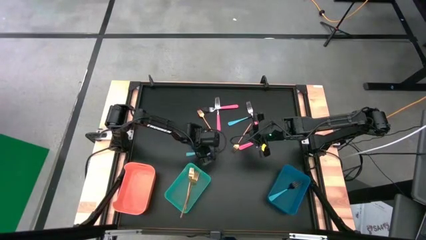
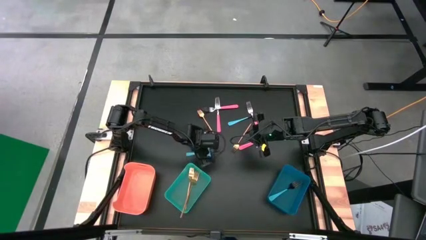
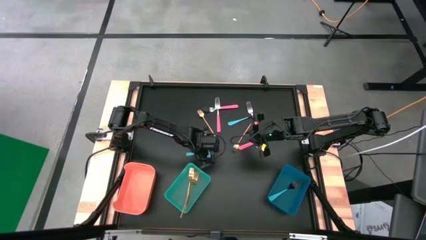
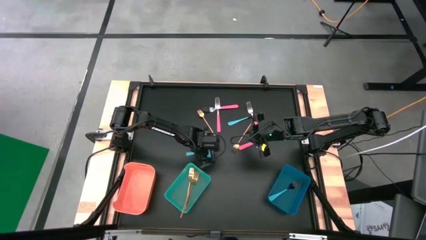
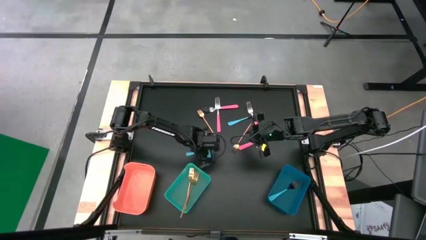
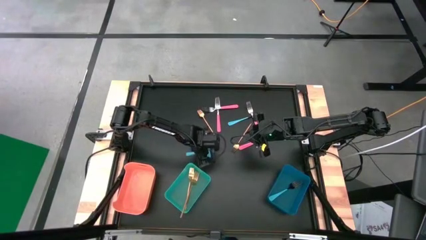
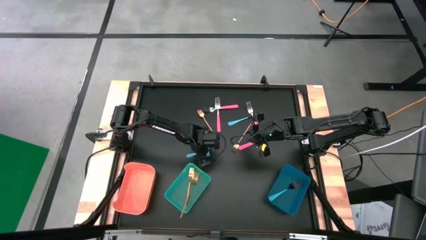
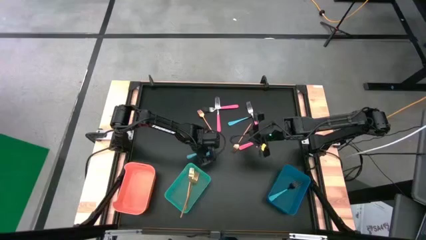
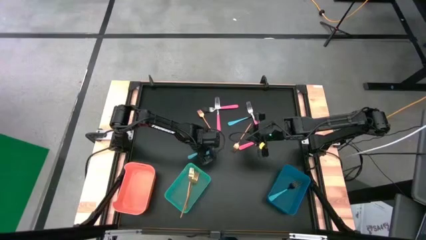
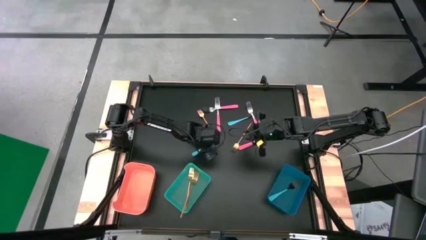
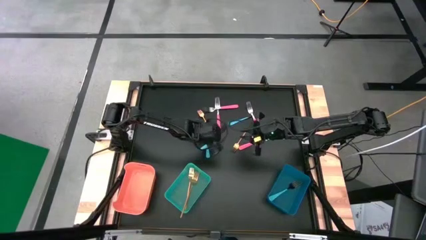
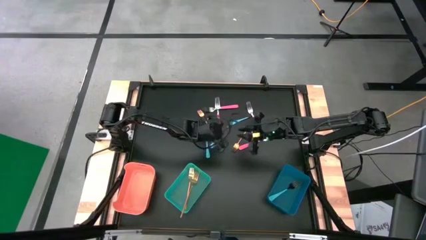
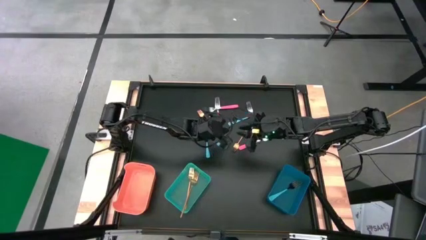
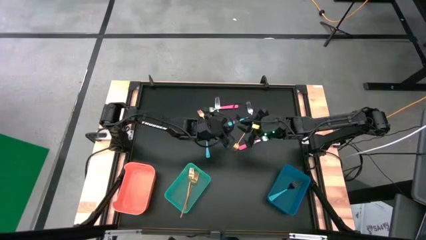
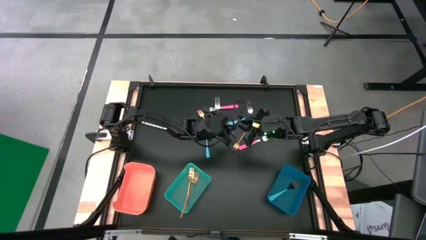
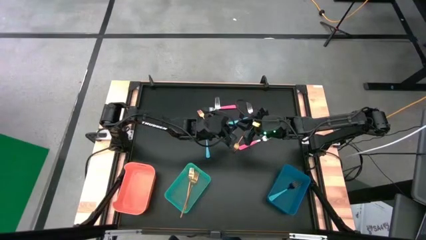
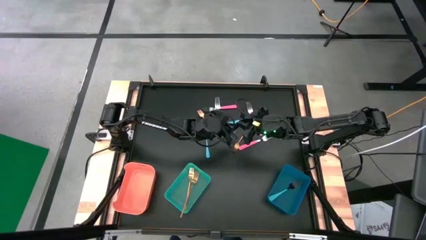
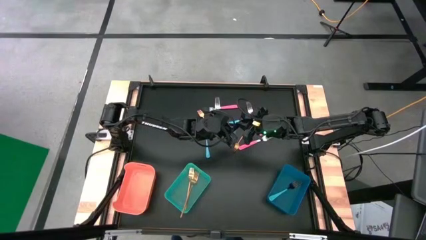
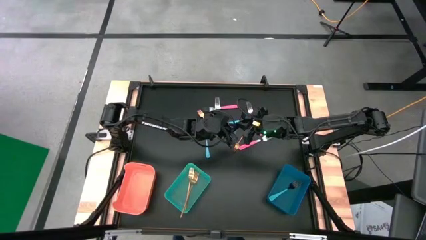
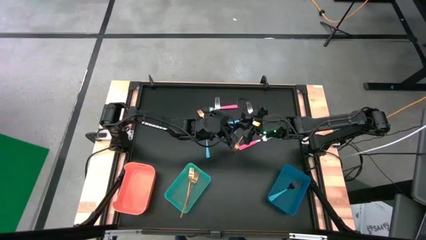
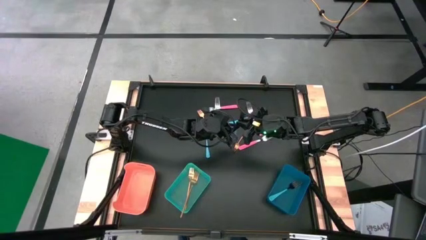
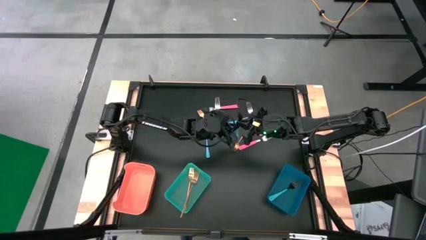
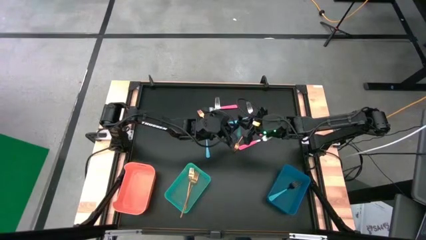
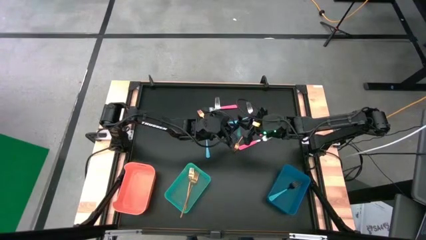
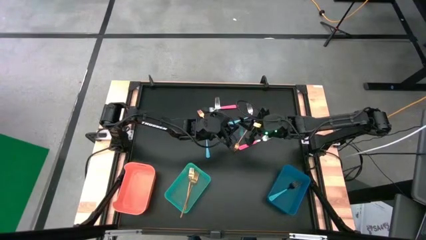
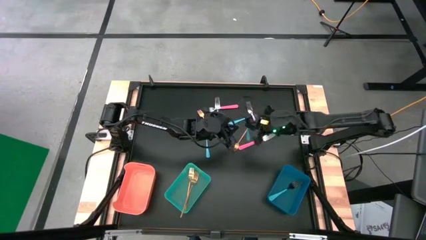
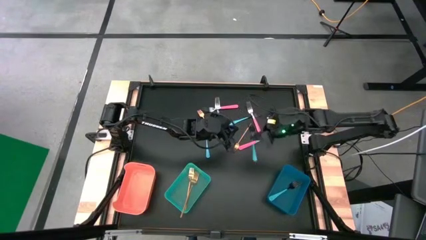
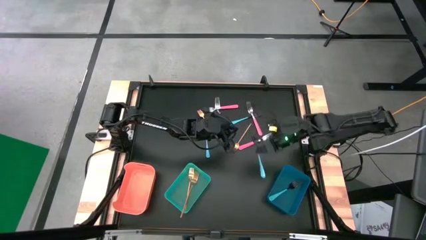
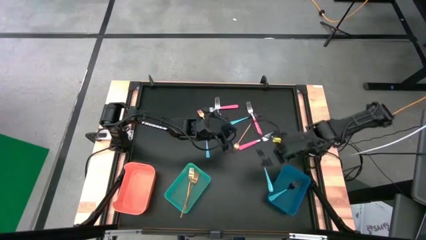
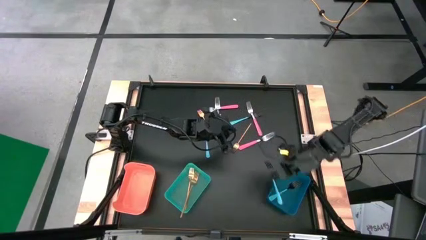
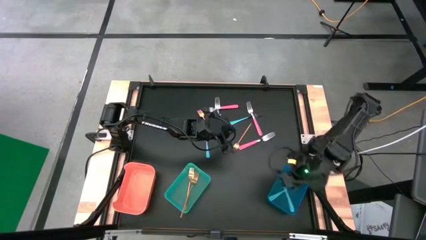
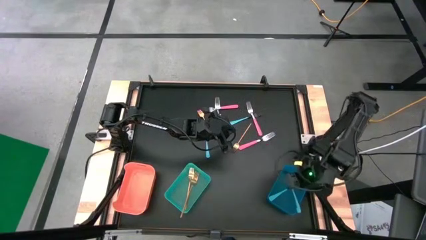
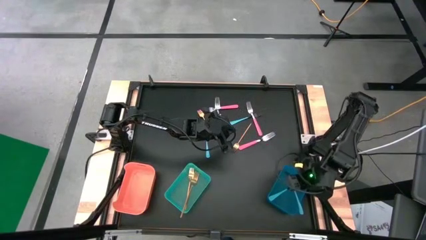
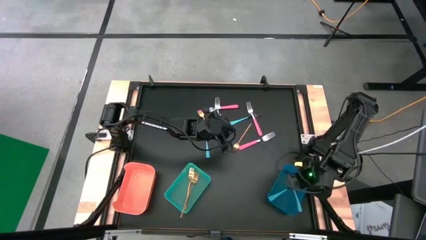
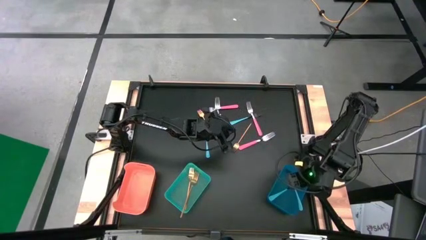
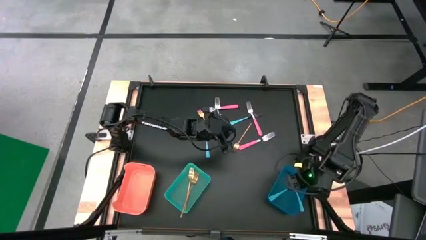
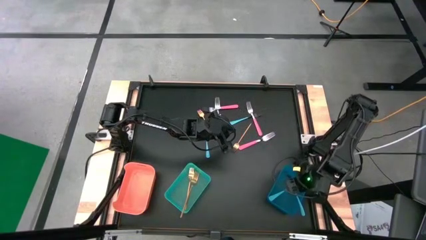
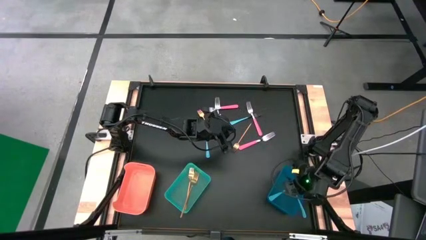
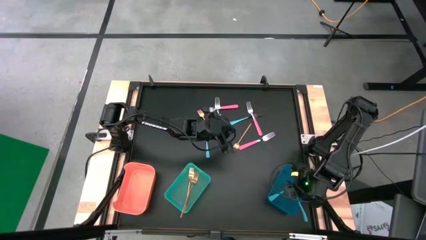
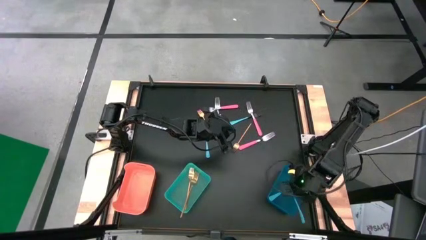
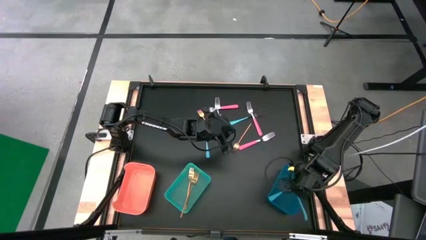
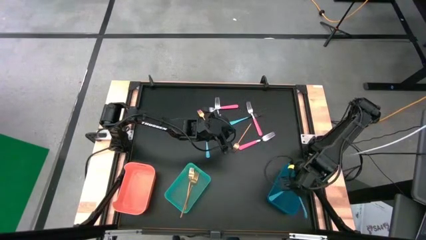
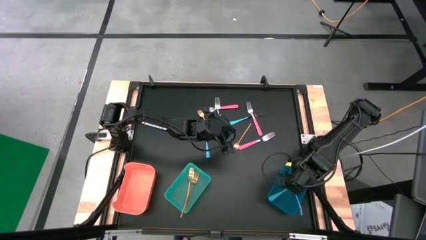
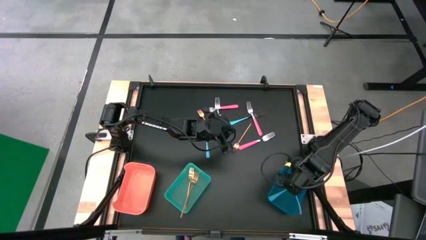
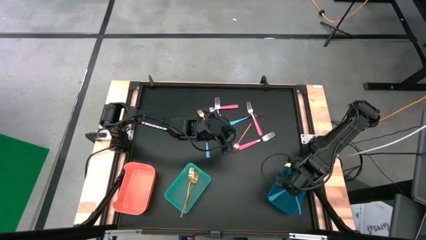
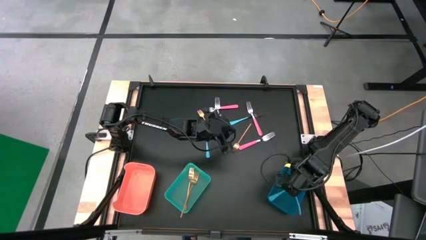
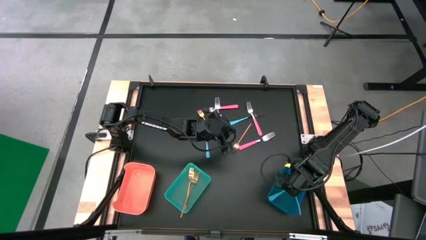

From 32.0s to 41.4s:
Task: Sort silverware by color (type)
Put the blue fork into the blue bin

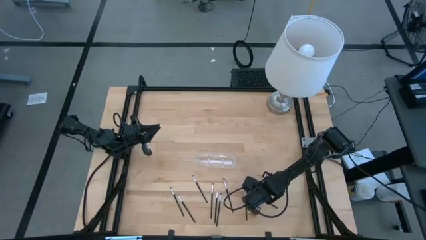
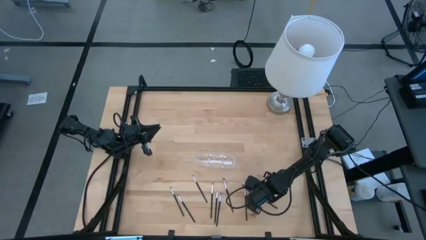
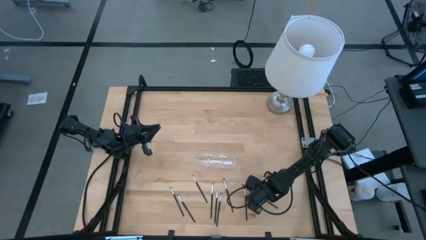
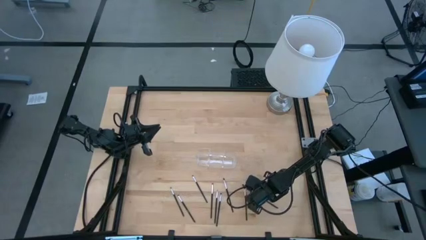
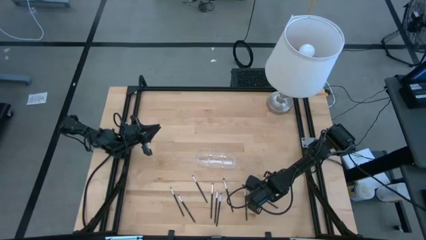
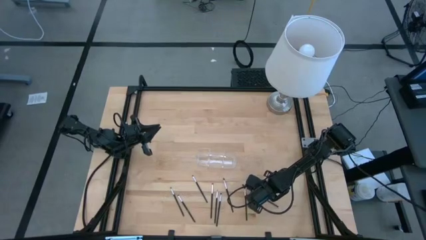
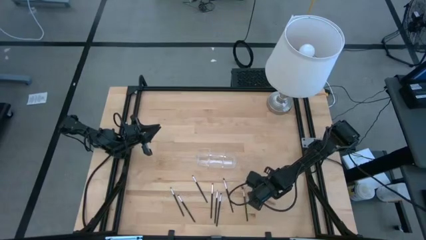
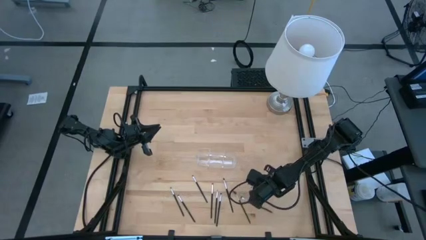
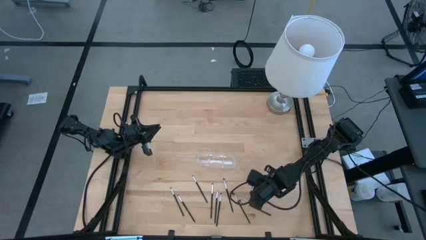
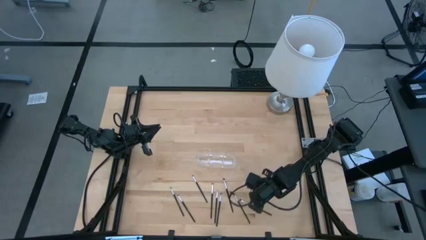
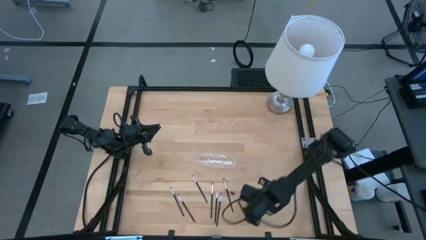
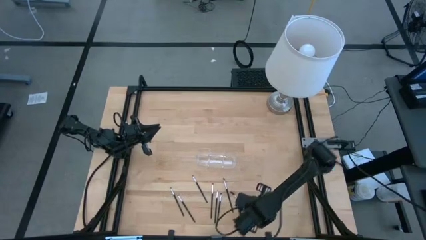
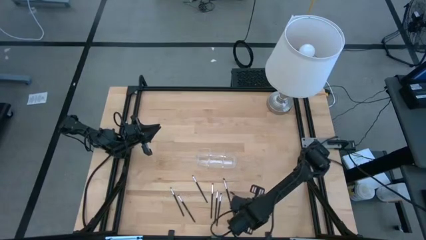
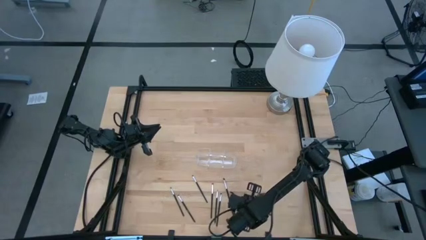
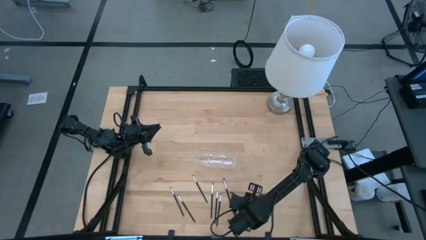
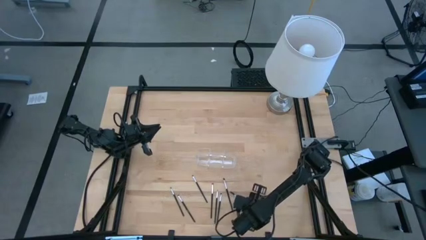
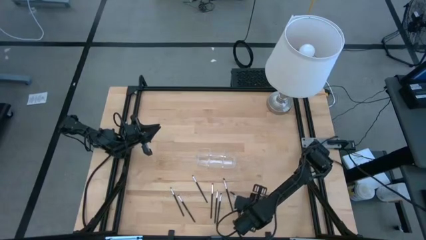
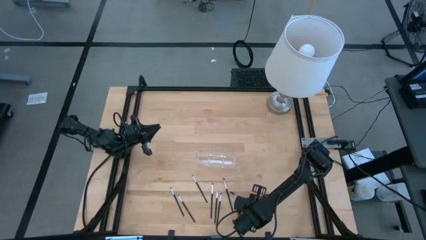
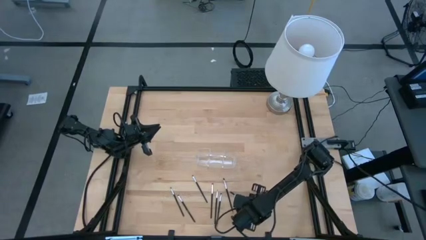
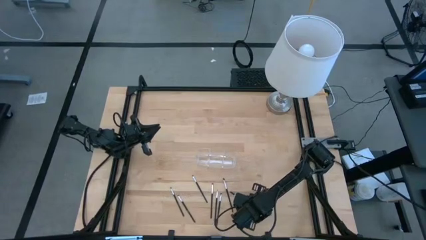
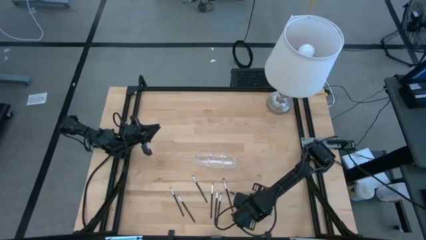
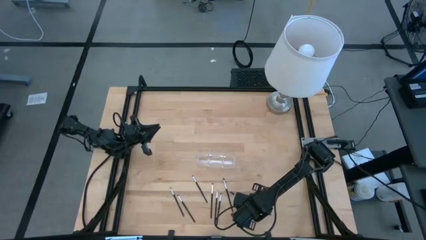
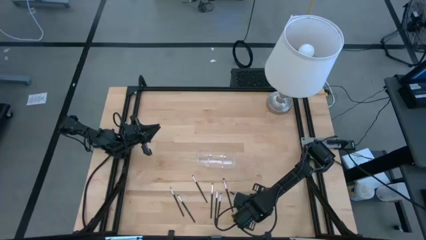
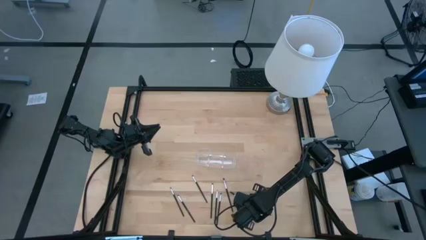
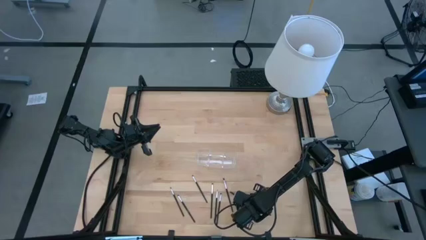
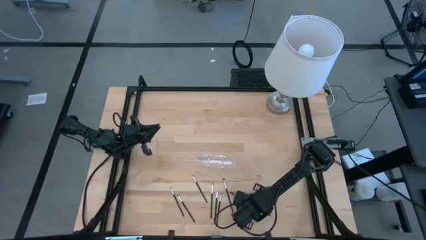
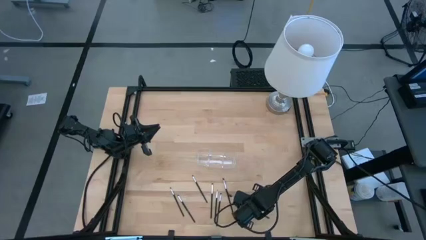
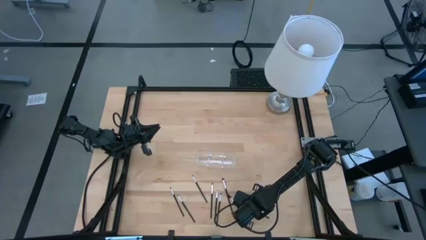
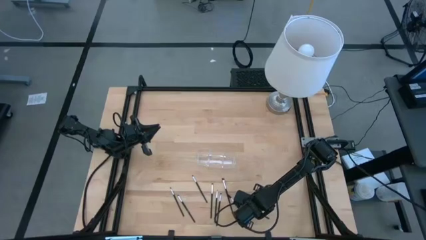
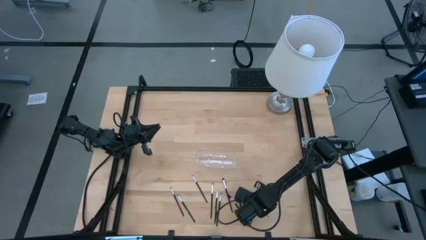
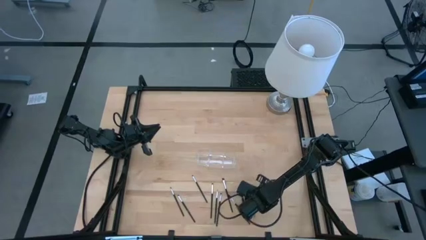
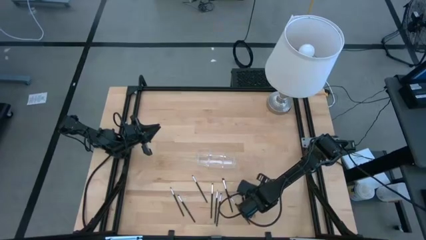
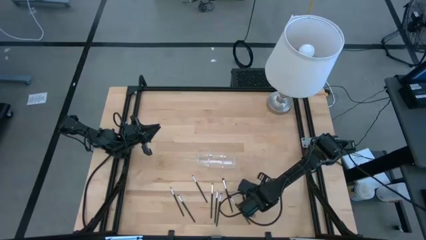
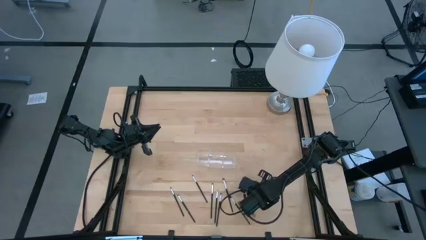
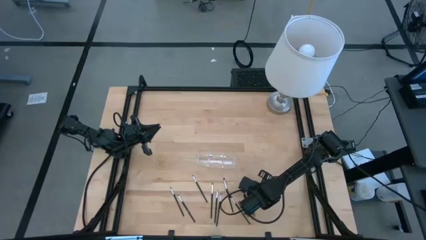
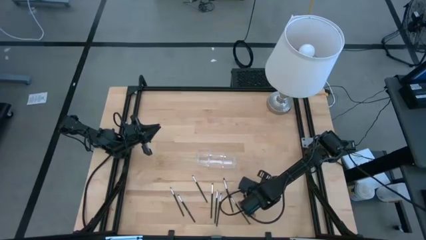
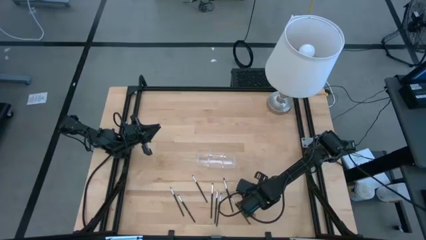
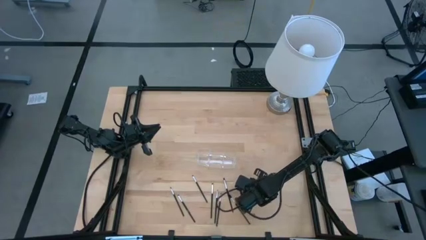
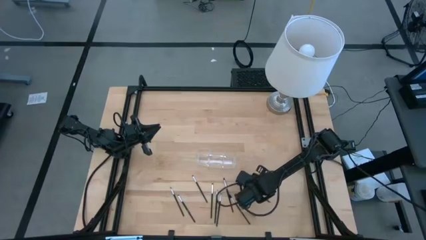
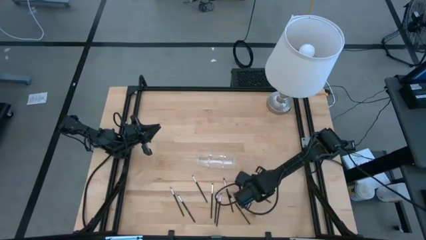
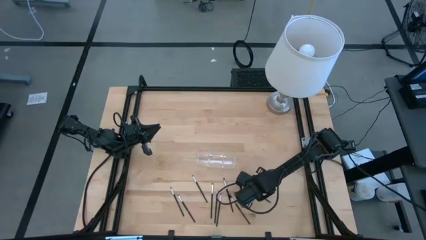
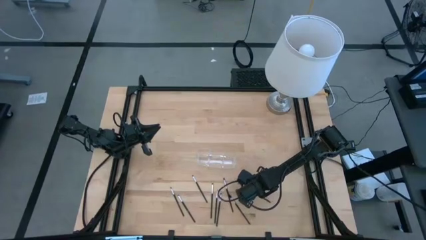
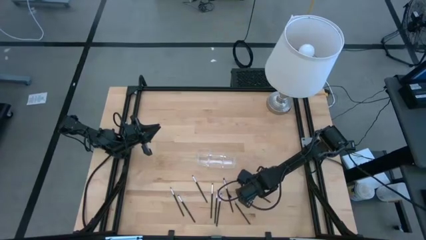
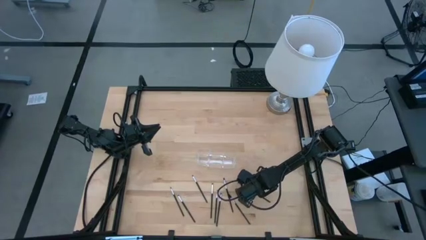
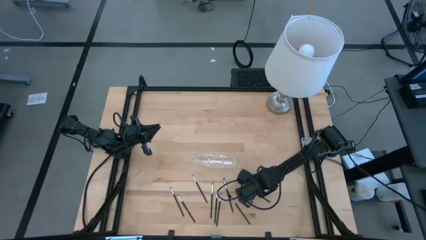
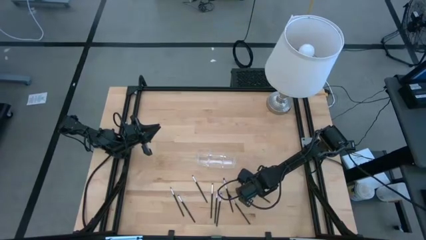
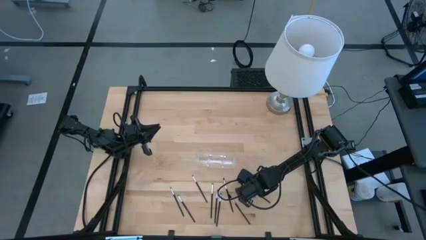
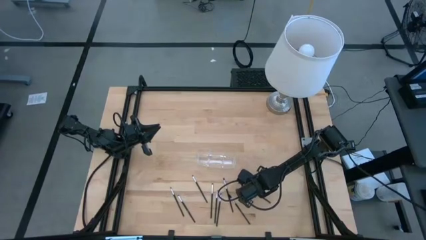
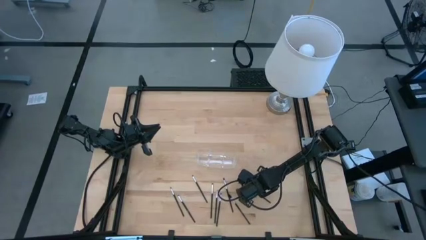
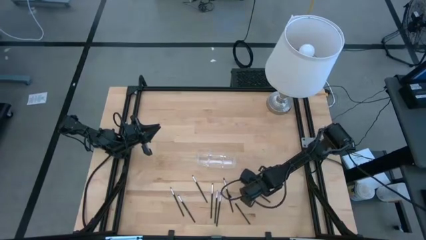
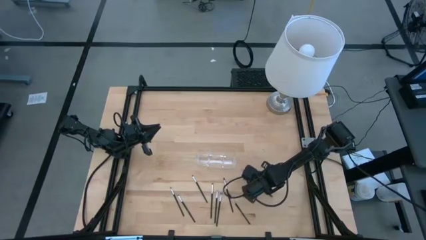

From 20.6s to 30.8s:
Task: Pick & Place Makeup Supplies
Put the makeup brush into the transparent organizer
